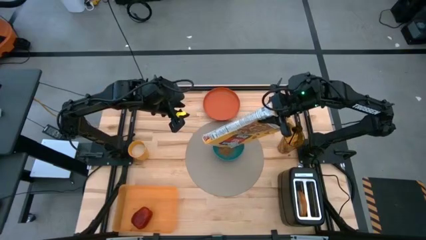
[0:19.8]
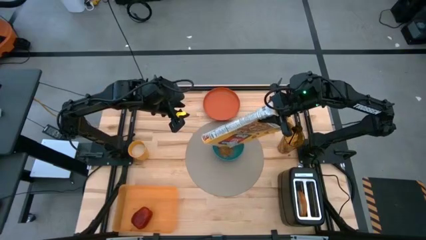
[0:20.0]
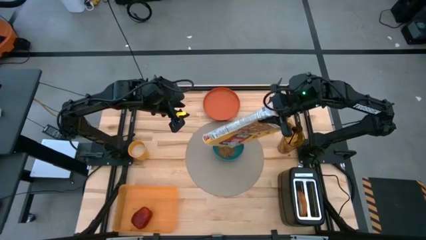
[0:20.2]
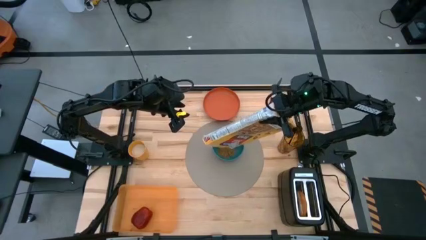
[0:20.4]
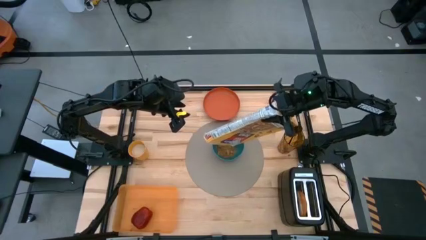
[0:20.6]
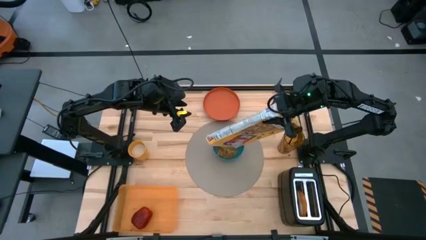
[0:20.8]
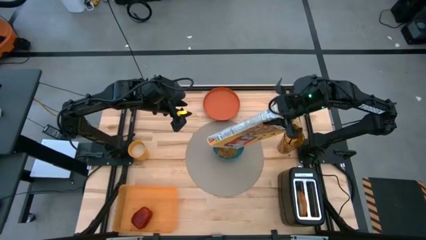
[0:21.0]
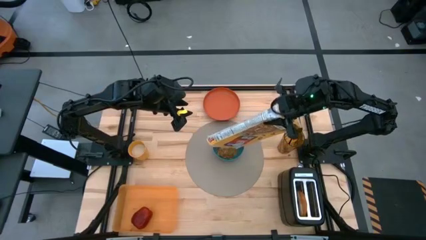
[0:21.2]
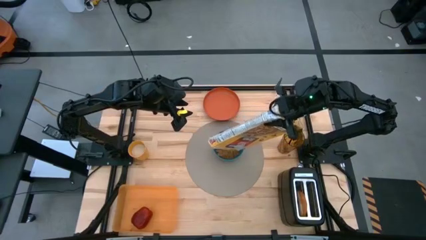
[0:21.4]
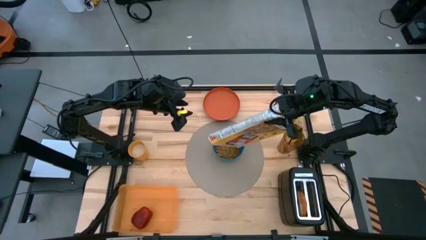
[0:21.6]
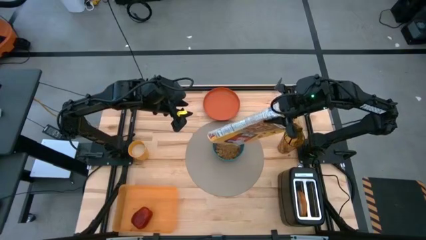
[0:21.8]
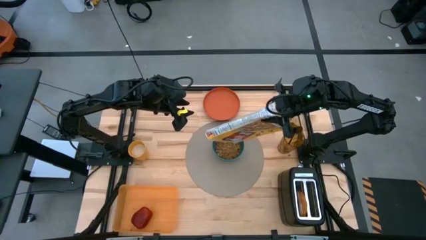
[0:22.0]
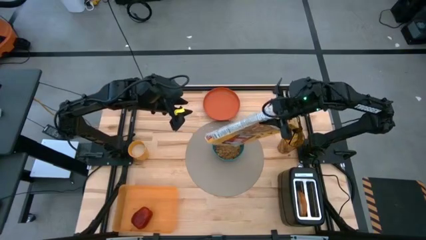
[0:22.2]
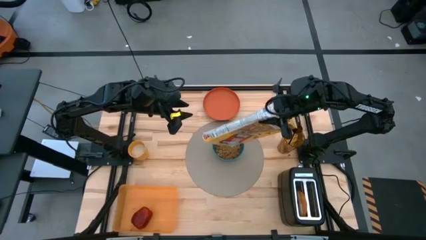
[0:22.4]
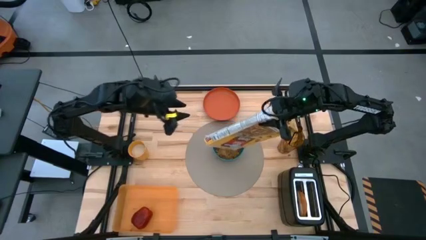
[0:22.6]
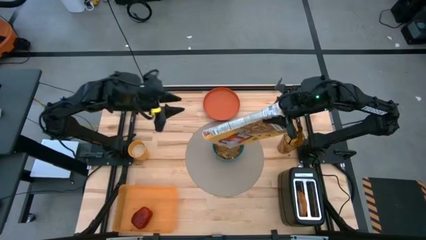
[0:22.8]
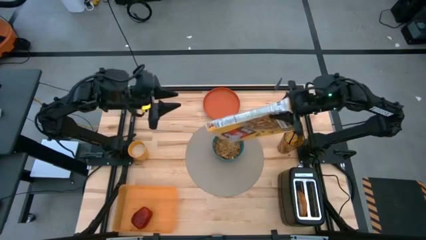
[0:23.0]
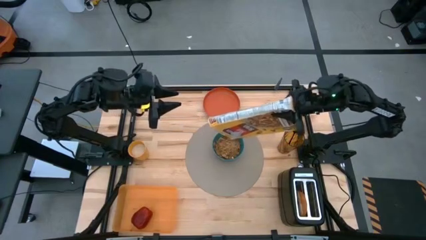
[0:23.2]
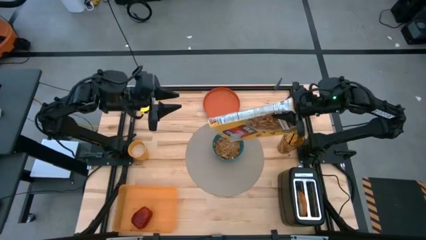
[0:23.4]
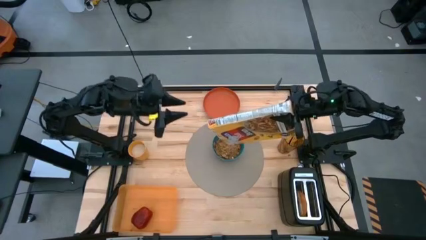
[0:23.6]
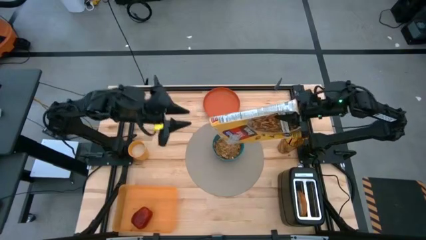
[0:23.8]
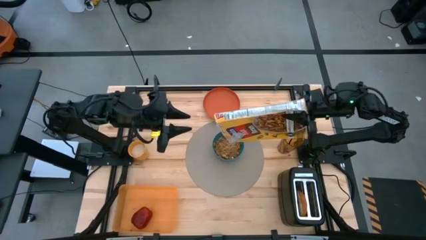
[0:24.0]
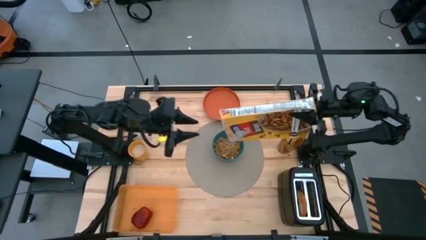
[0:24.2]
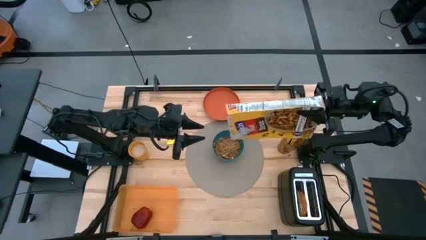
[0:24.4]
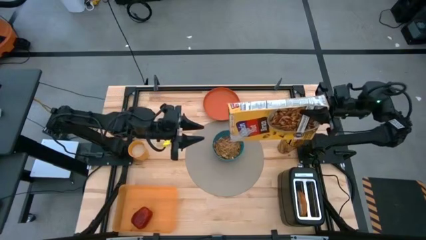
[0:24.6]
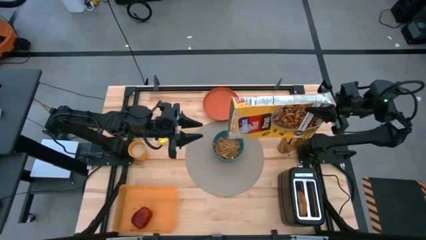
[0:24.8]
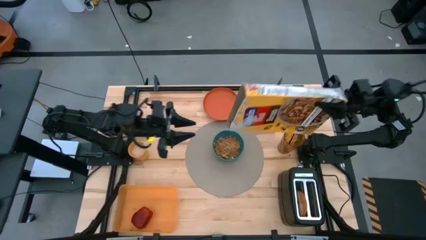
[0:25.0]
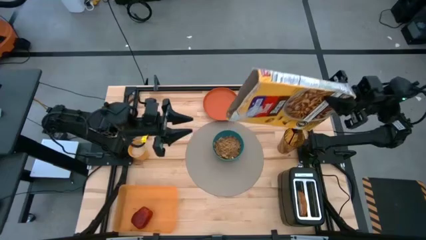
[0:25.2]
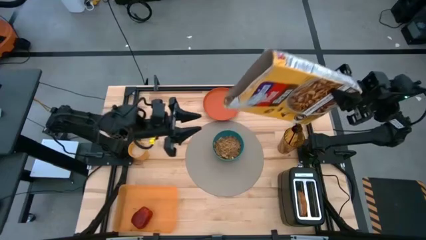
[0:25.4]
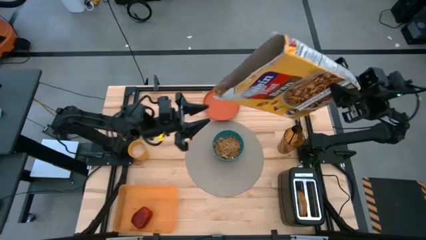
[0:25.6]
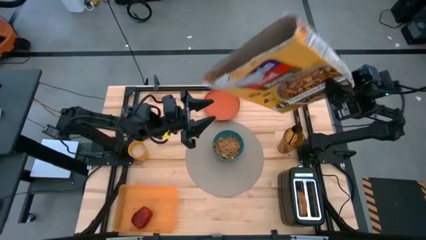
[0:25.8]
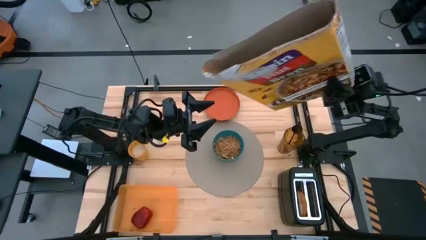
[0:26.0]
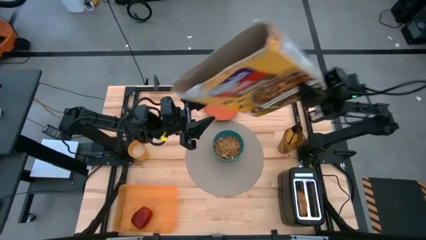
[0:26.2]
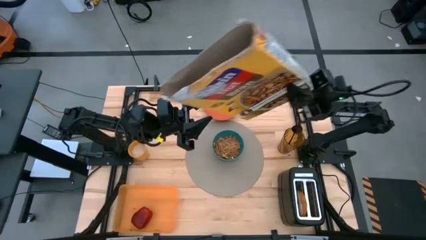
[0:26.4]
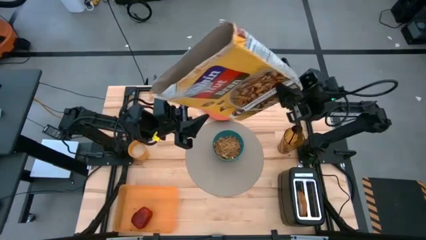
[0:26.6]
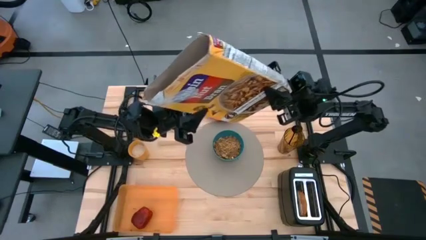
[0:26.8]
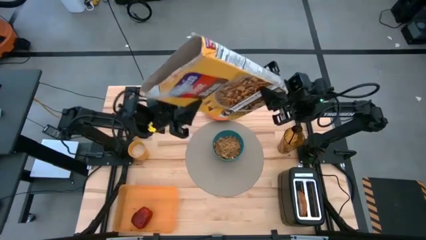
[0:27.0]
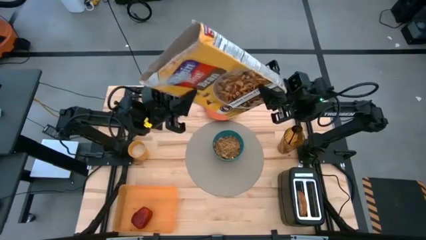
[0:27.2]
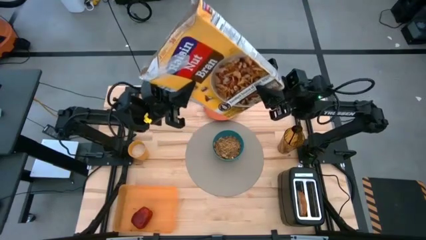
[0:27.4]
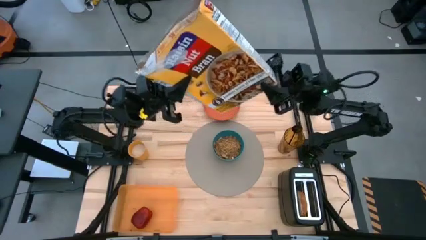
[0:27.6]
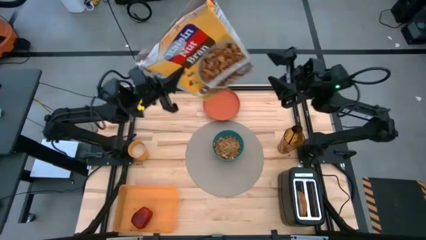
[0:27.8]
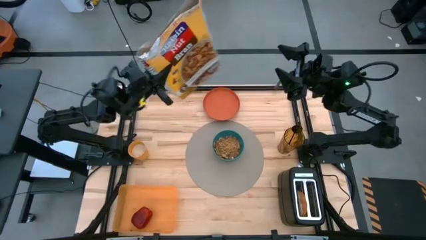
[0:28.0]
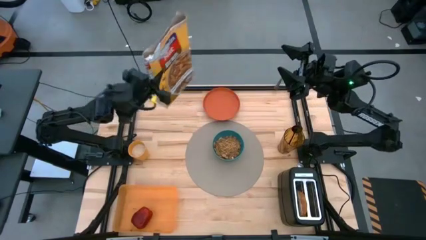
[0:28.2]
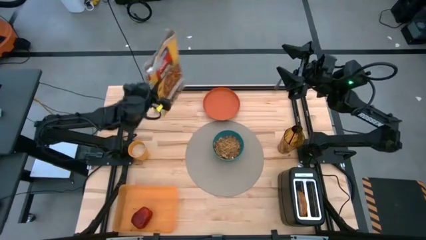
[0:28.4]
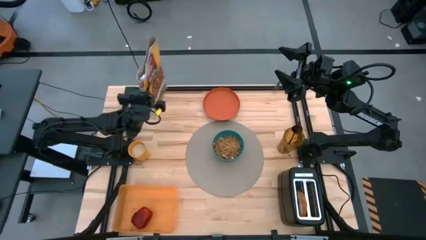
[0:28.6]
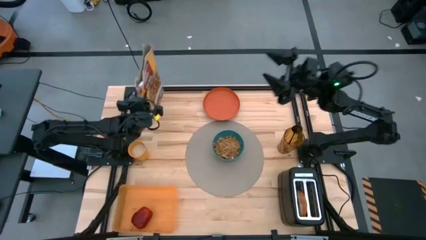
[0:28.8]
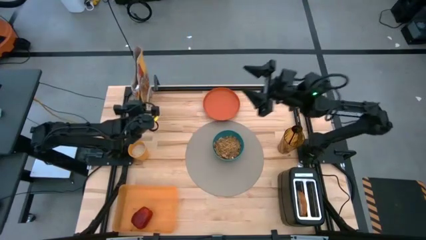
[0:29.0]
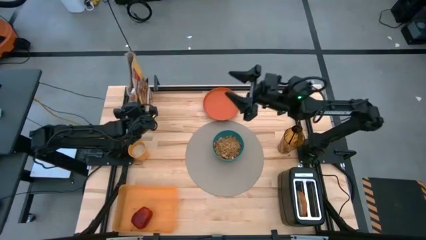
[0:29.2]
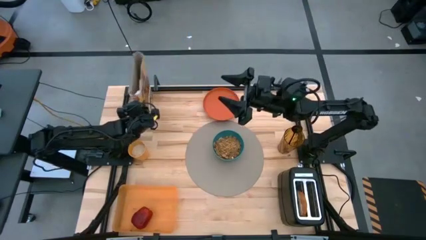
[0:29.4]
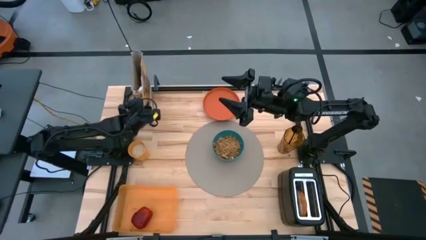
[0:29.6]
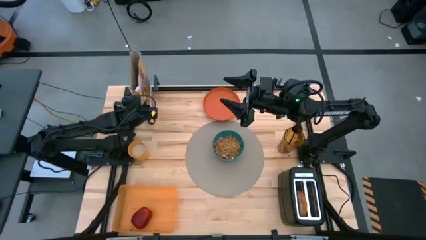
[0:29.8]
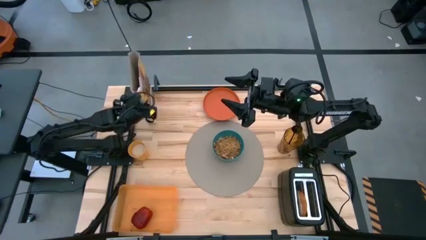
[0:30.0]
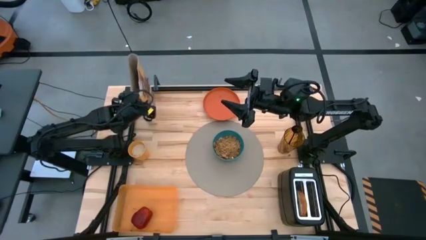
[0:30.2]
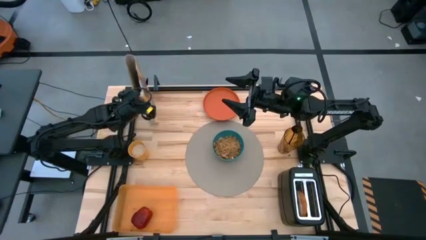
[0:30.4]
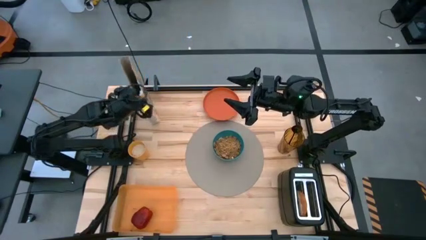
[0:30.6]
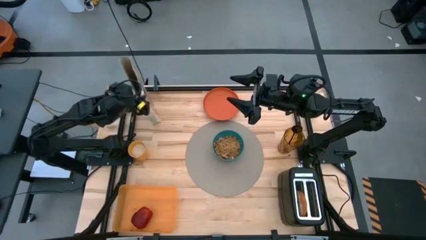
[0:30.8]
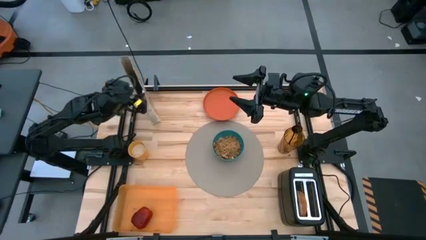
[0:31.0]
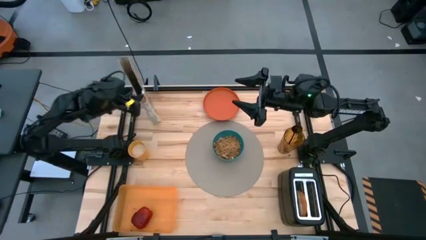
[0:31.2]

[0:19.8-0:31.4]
Task: Arrange a breakfast setting
Pour the cereal into the green bowl

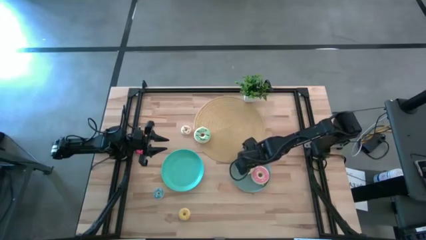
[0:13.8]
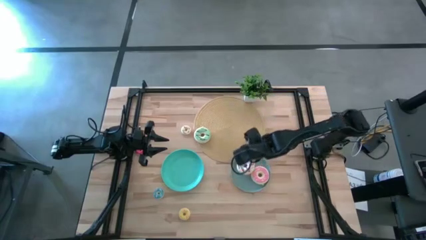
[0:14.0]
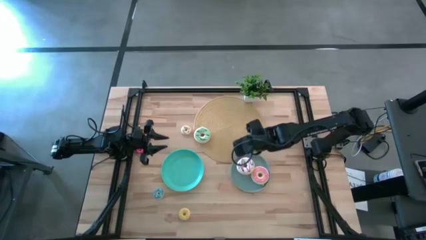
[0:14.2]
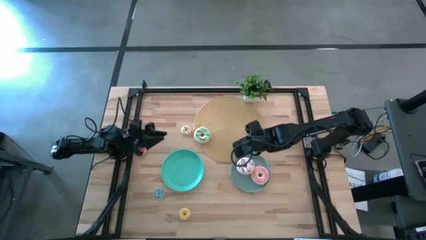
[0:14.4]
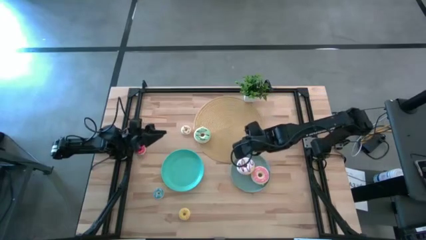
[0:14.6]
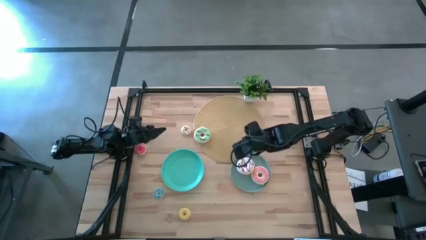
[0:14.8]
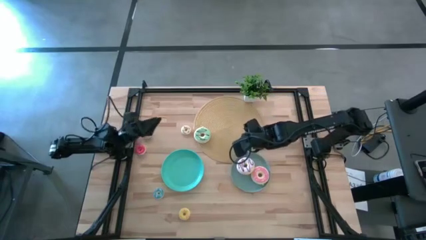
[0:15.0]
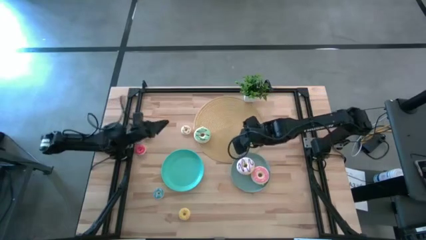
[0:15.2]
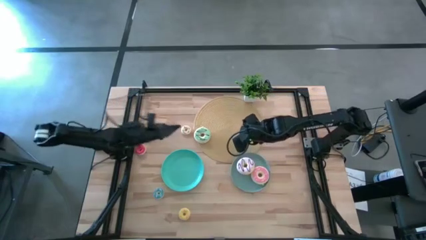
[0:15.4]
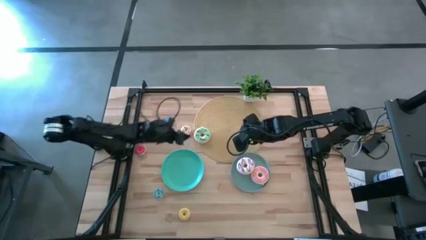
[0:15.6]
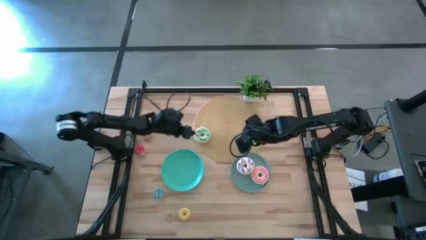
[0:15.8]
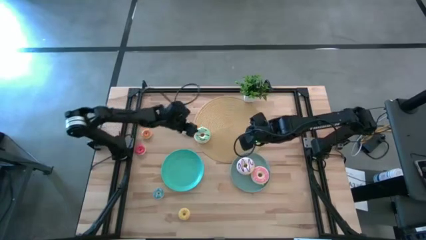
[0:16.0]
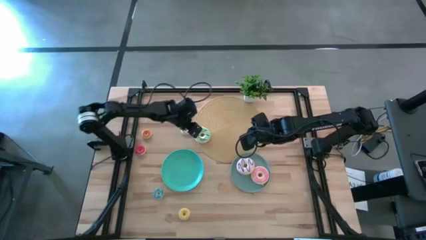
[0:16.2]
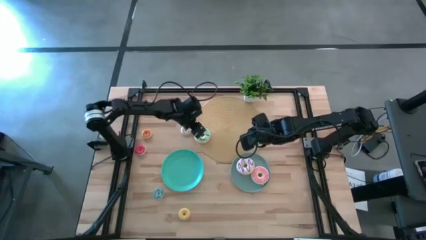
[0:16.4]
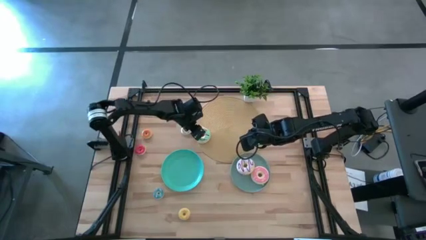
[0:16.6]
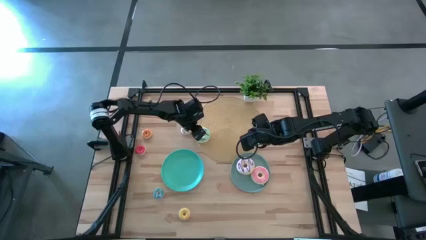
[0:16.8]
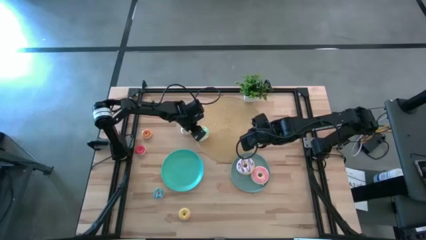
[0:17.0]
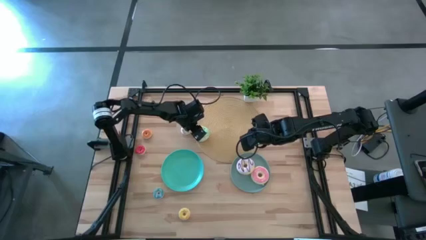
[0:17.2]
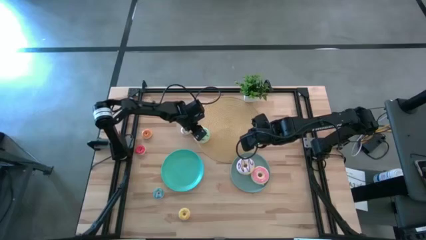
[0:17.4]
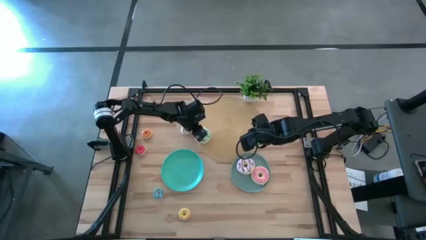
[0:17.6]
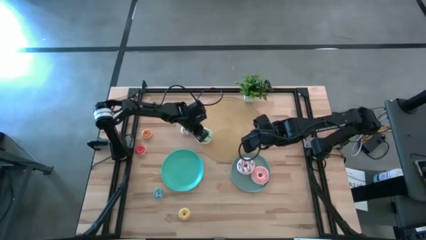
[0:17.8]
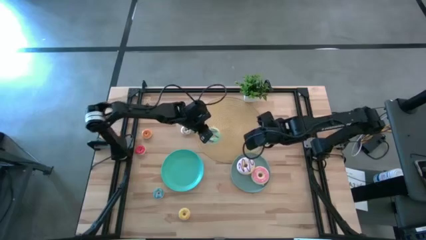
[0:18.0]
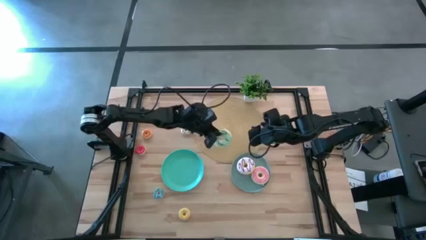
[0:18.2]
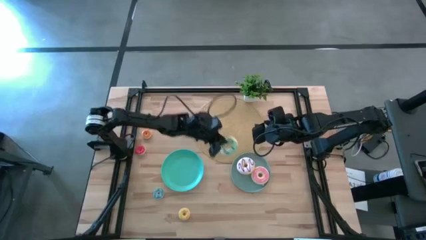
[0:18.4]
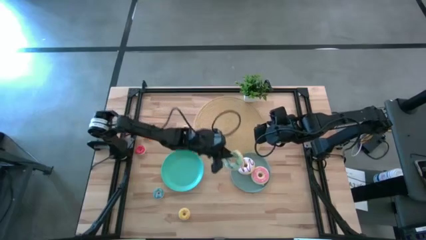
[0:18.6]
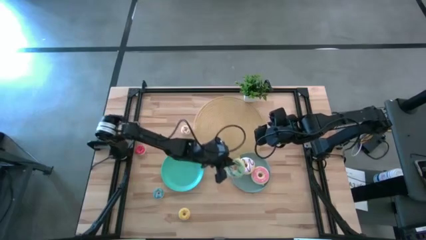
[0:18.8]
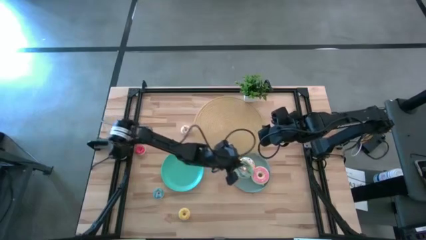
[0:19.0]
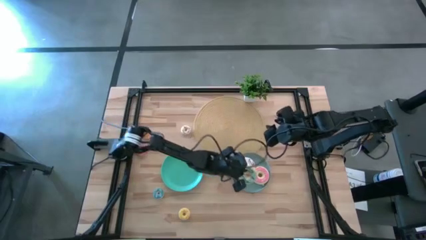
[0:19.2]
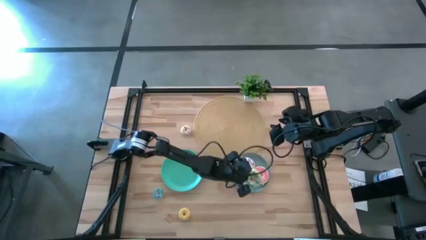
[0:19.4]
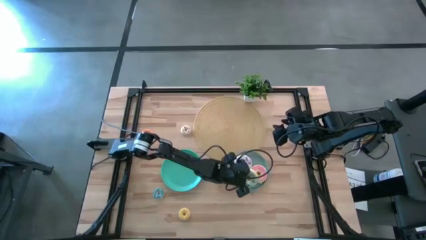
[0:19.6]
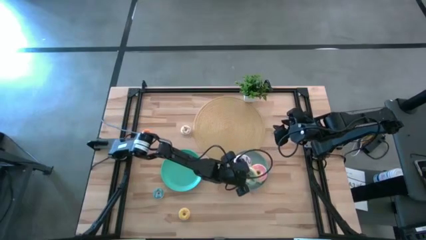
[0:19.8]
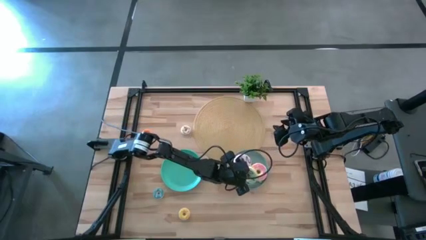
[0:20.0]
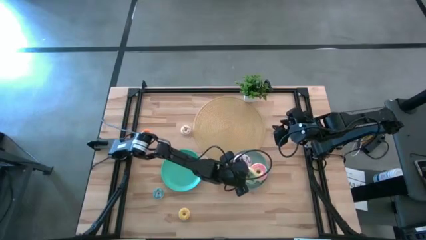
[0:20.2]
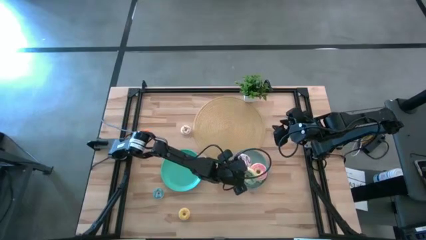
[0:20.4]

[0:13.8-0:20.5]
Task: Pick & Place donuts
Put the large light blue donut on the gray plate
